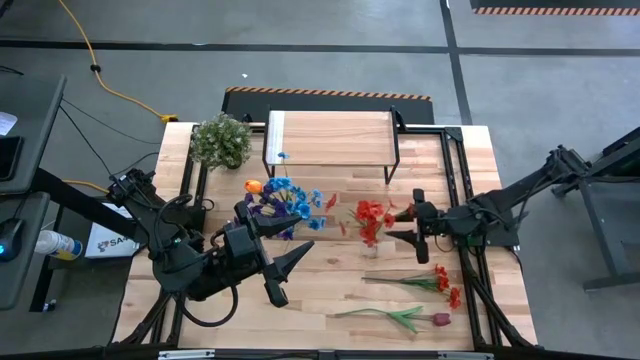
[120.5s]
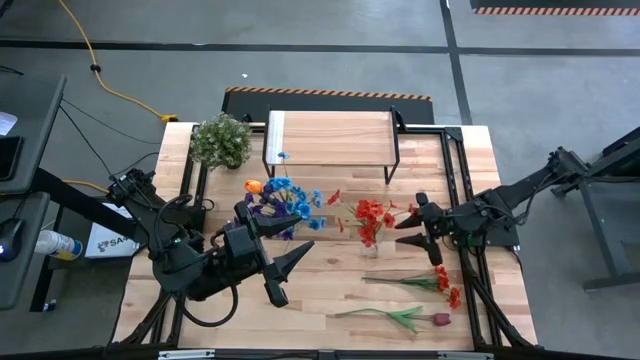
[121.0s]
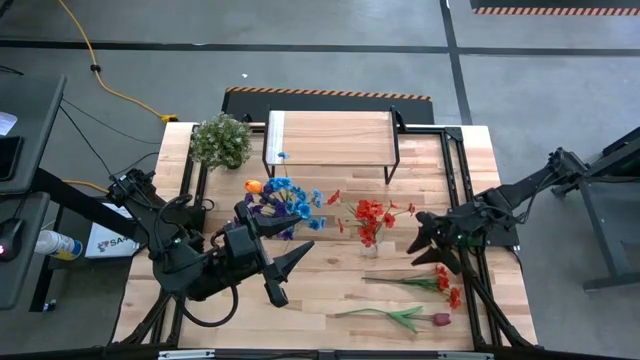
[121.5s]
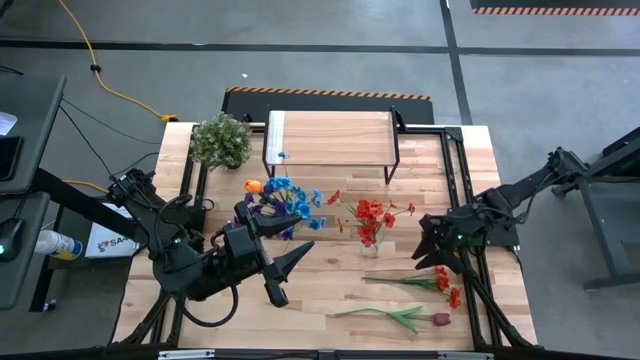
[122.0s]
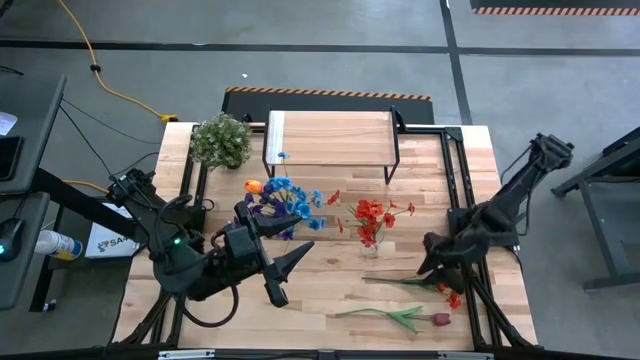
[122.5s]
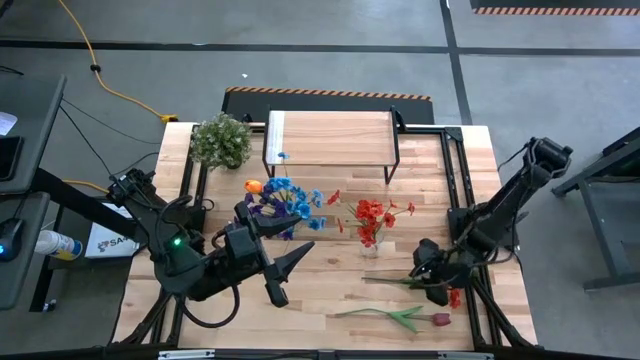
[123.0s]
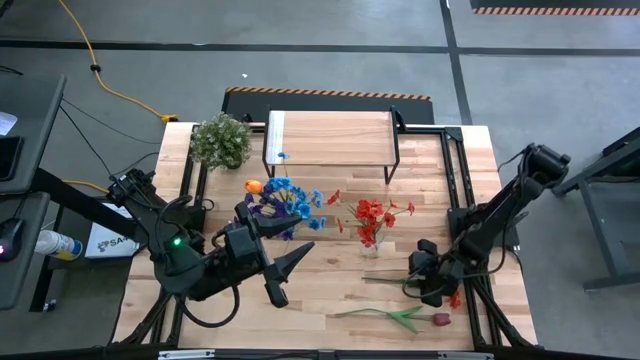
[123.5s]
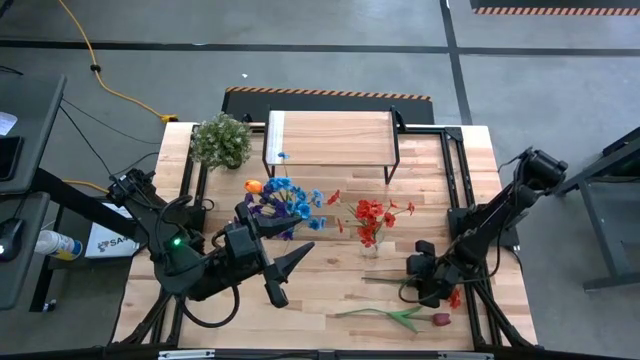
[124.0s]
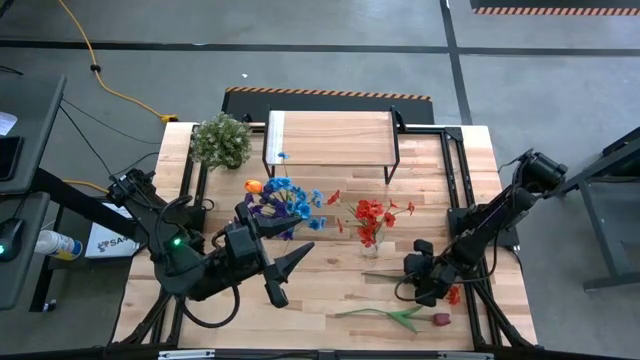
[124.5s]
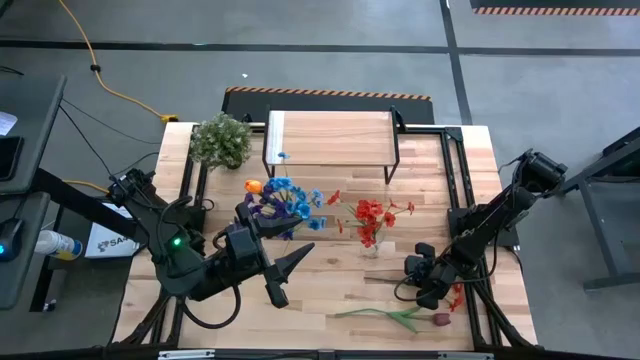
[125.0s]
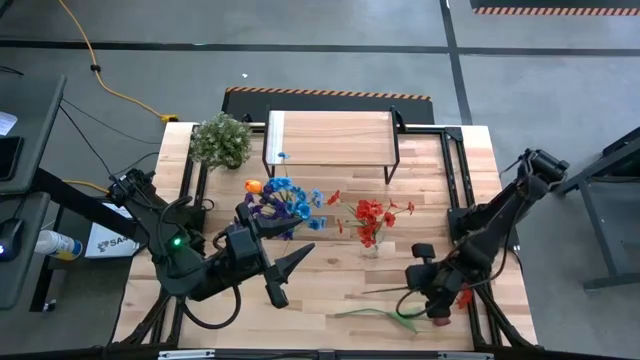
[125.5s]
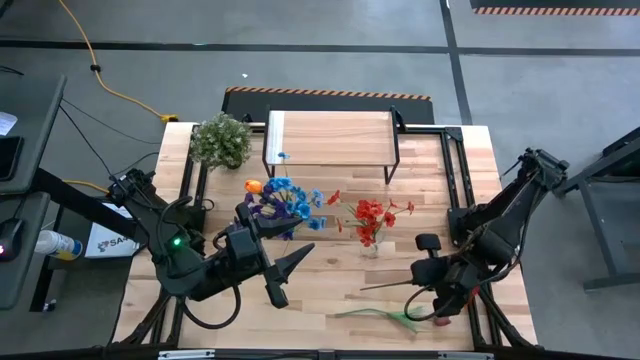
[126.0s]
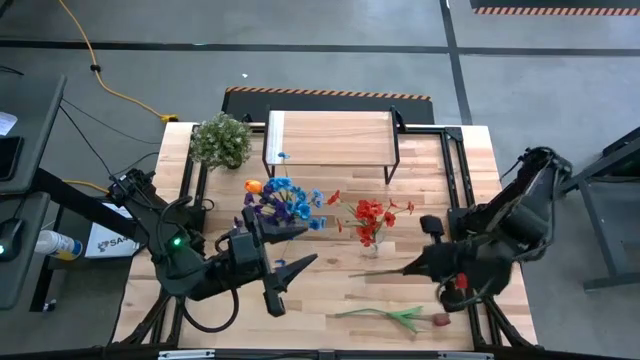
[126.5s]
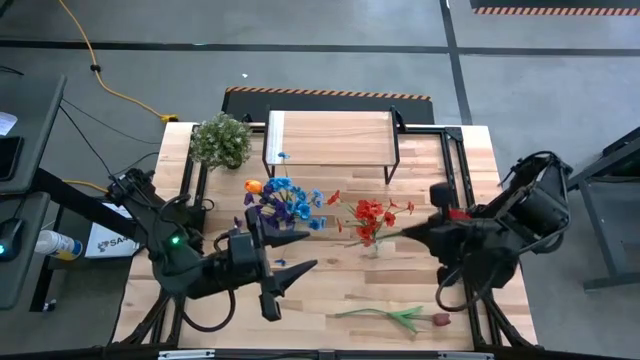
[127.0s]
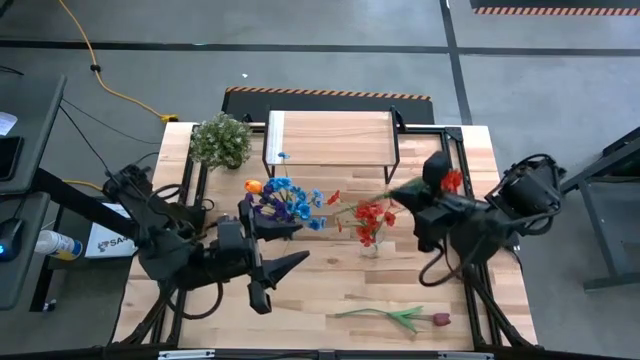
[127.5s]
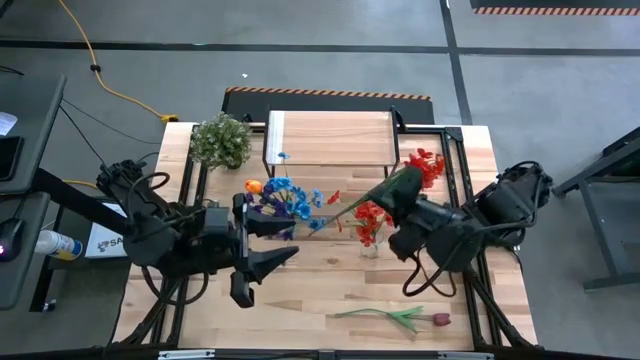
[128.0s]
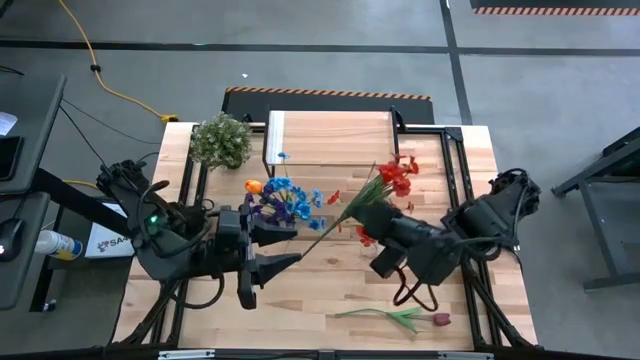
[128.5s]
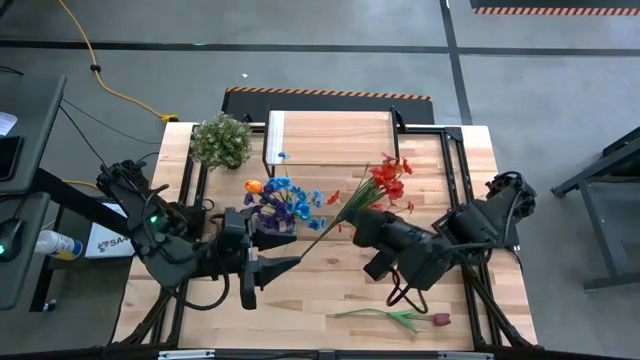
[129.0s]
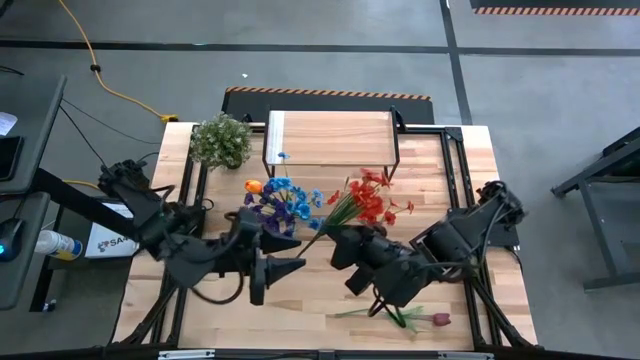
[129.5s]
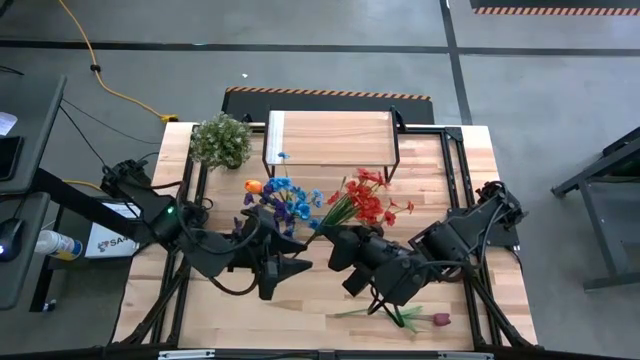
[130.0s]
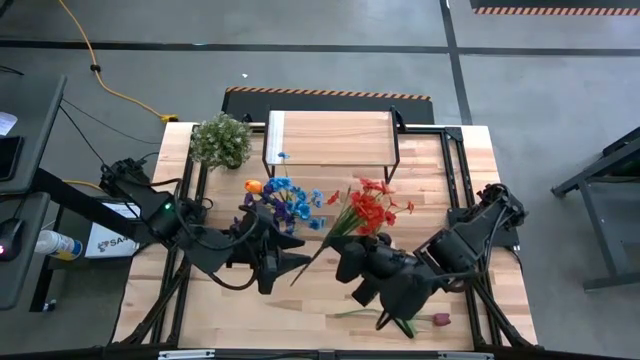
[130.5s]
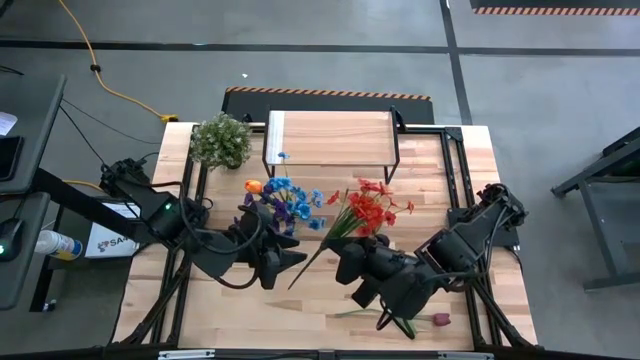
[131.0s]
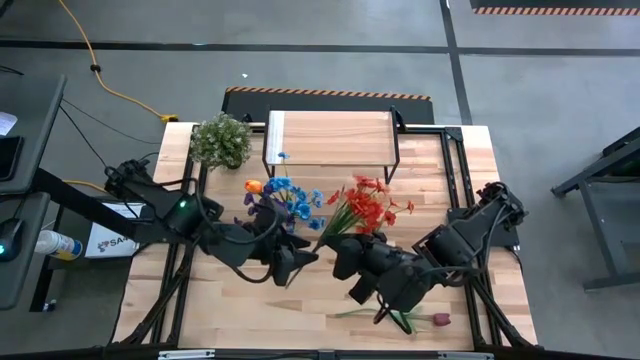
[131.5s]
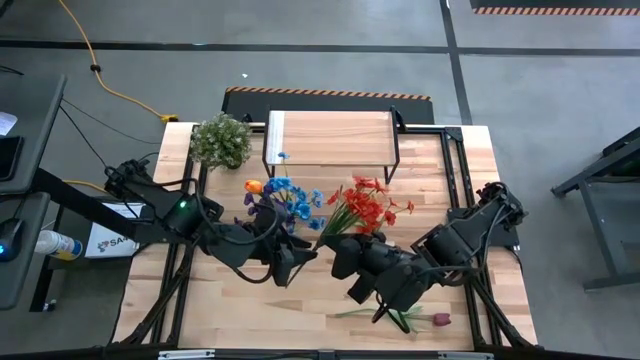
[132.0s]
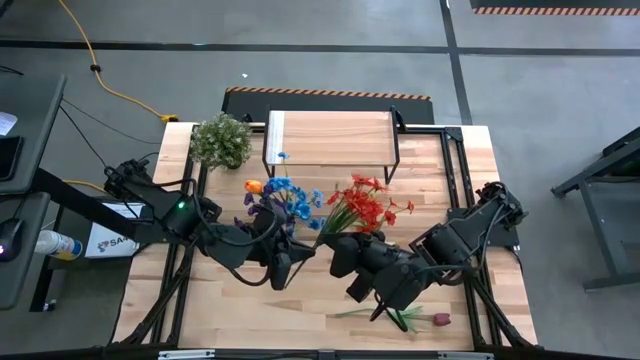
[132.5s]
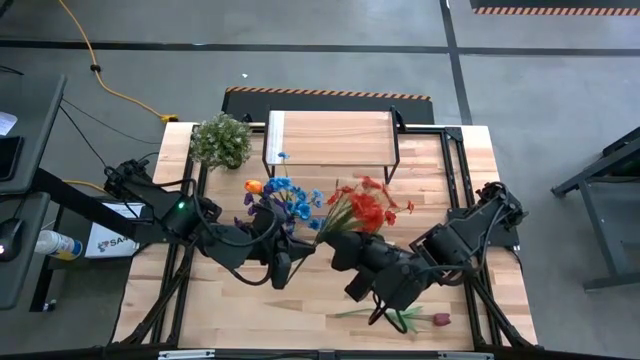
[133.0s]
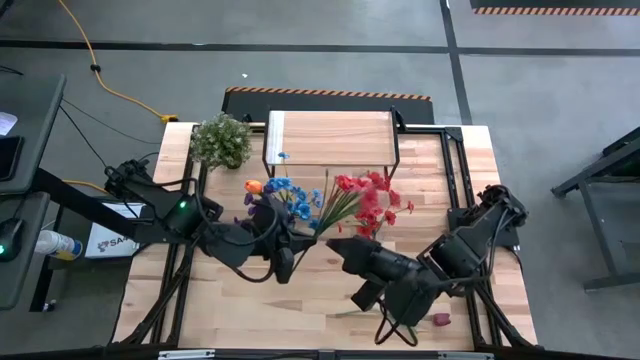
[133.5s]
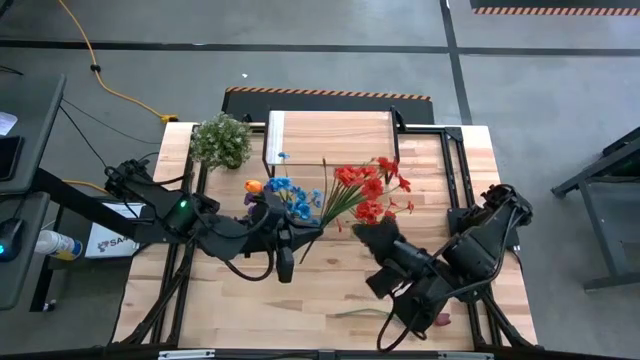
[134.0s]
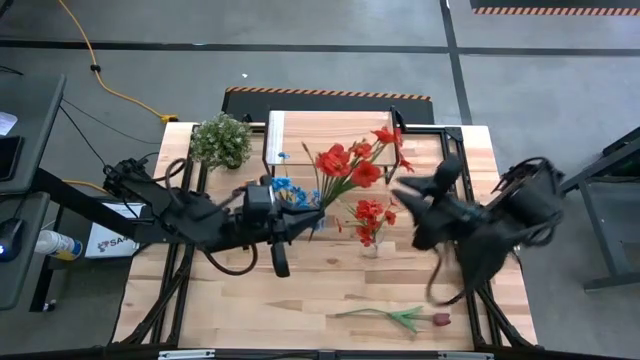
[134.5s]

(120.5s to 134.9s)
Task: Pick and place flowers into a vace then onto a shelf
Put the red flowers into the right transparent vase

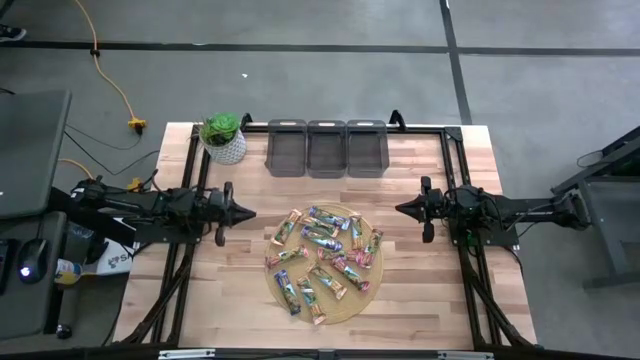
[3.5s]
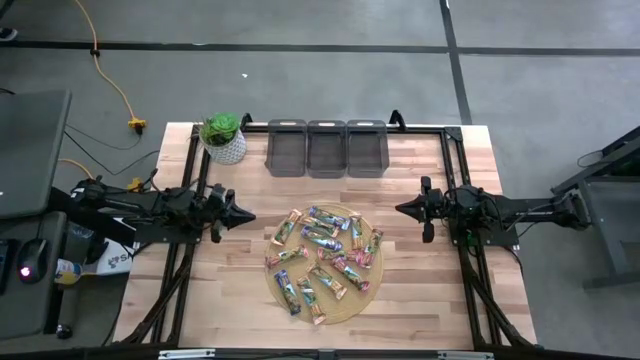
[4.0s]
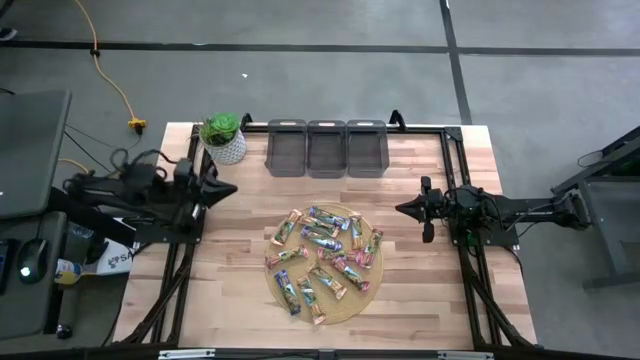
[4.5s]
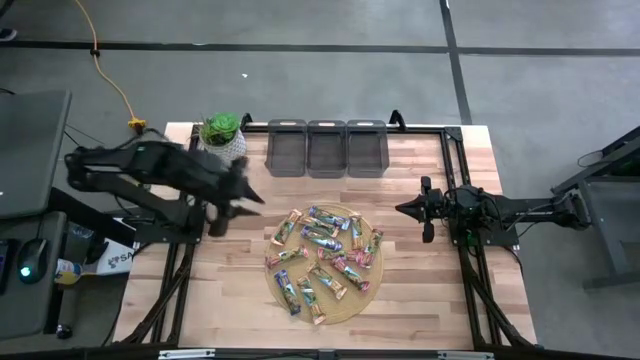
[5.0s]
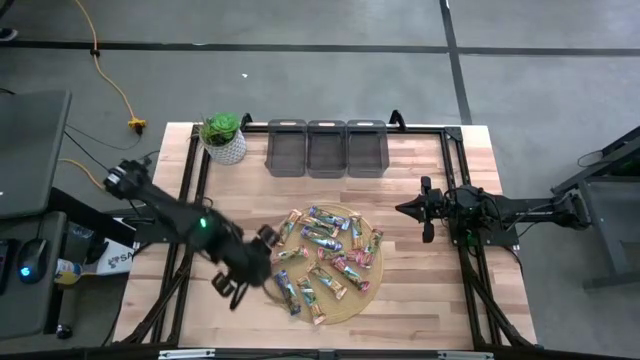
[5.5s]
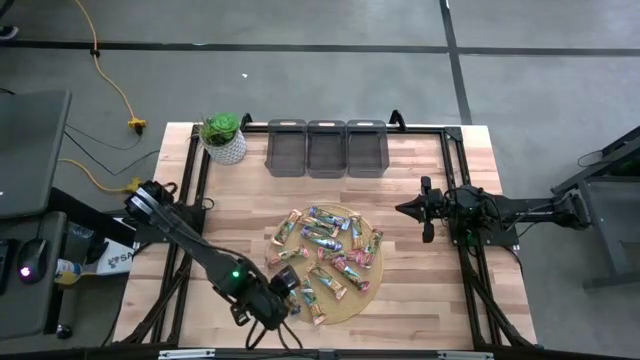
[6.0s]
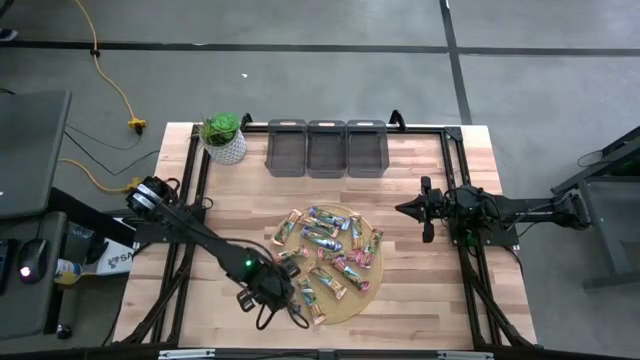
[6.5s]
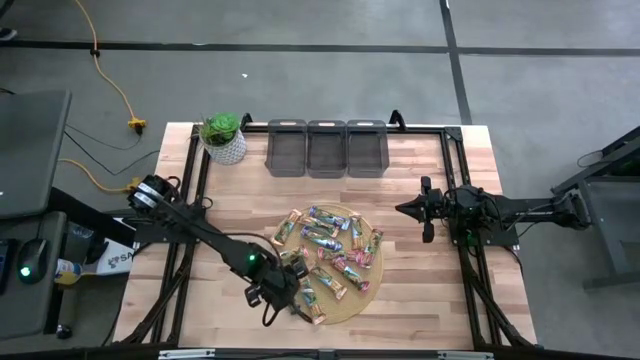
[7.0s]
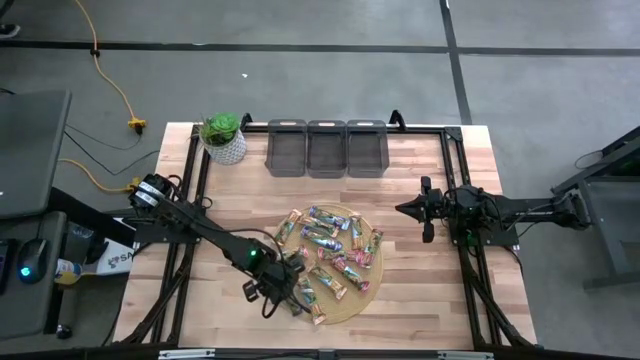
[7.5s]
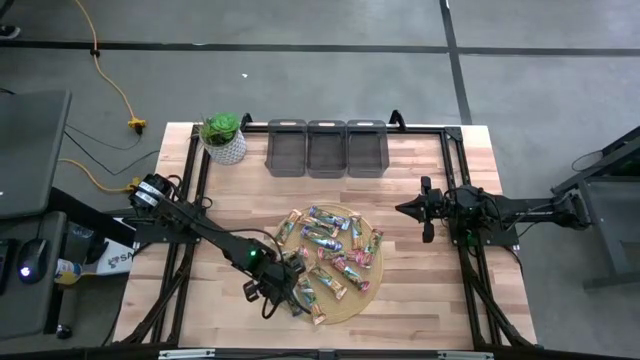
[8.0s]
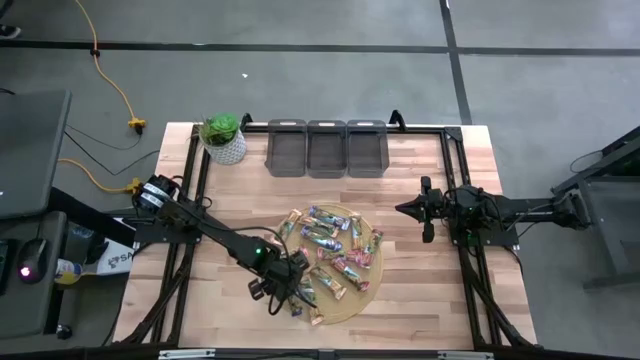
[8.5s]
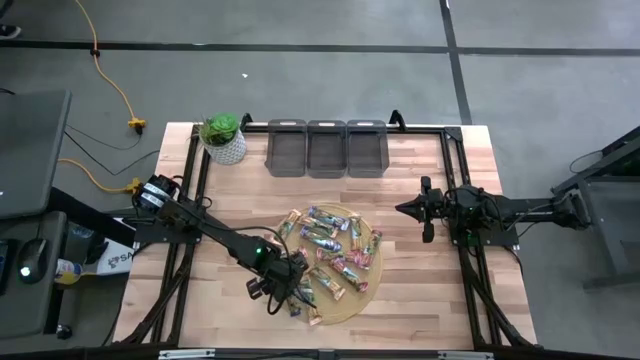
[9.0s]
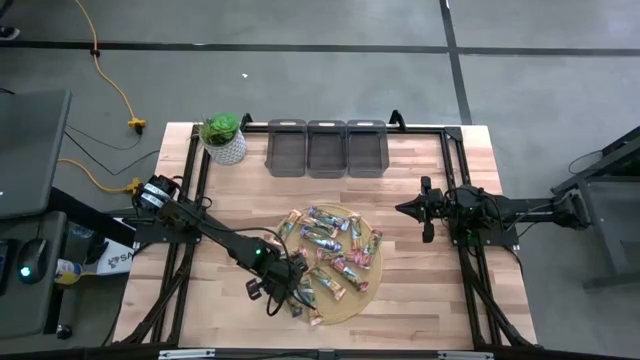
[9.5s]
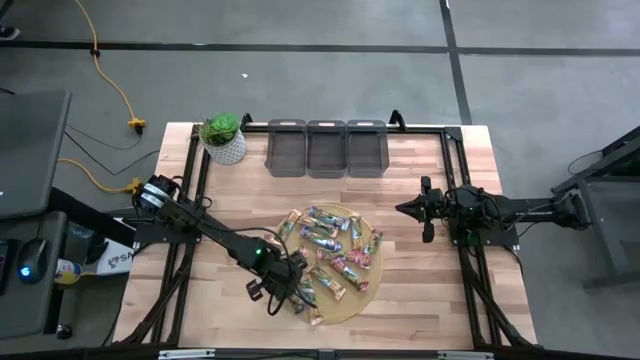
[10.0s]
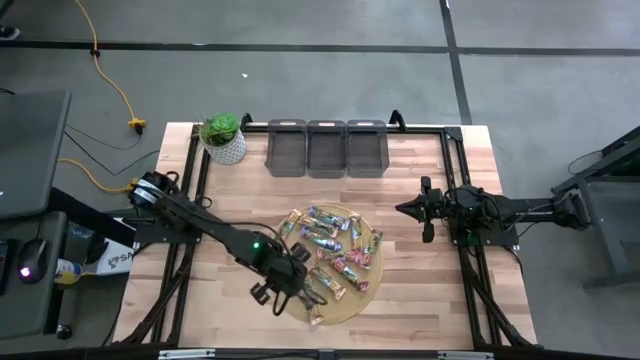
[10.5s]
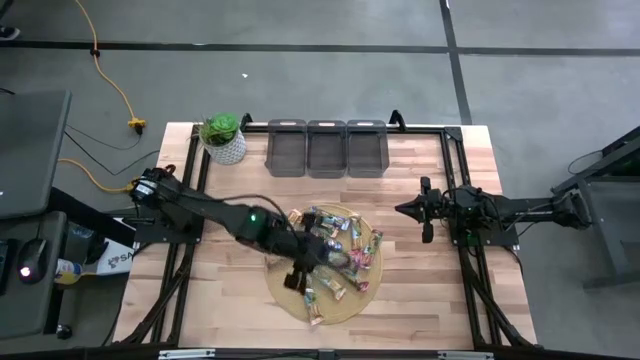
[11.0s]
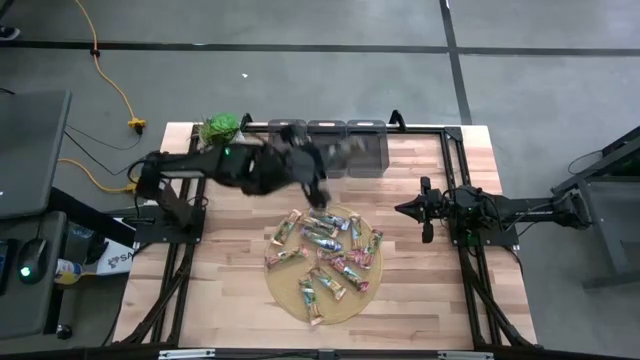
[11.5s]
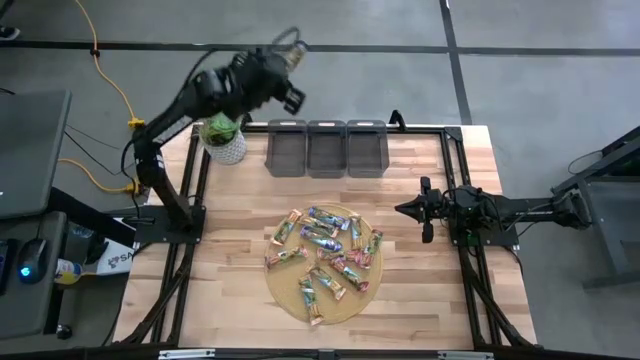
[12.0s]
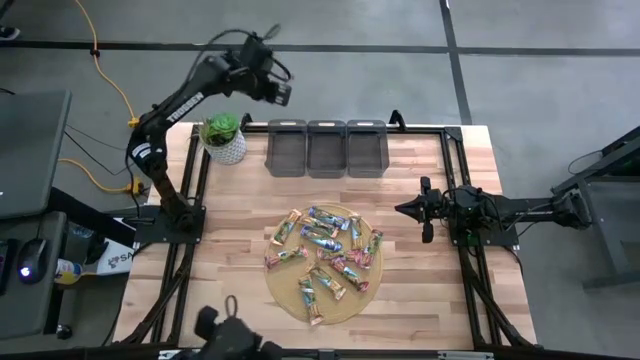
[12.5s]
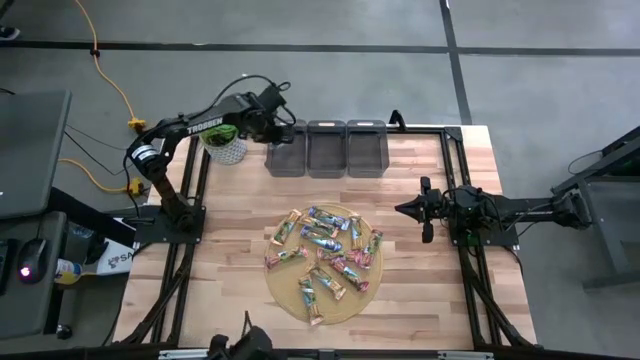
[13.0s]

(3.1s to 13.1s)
Task: Pick and place Granola Bars by type
Put the blue granola bar into the left black bin
